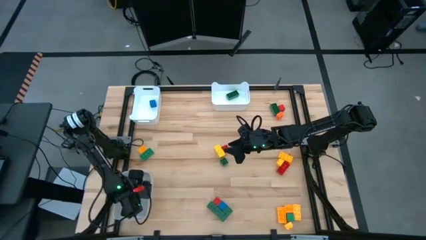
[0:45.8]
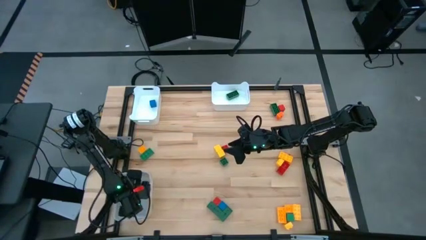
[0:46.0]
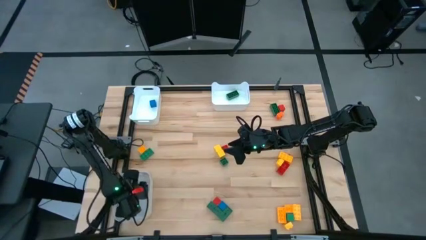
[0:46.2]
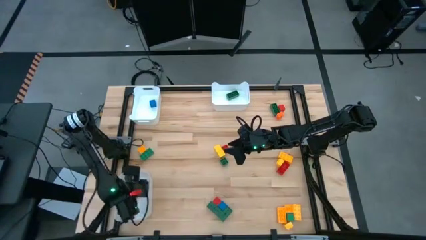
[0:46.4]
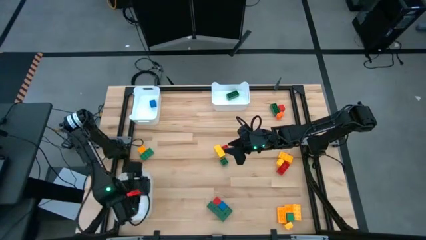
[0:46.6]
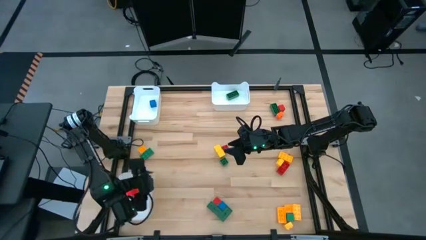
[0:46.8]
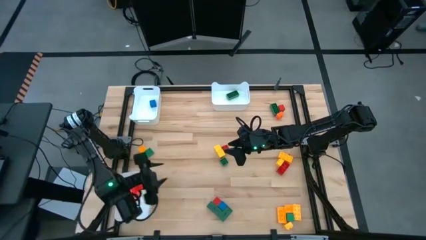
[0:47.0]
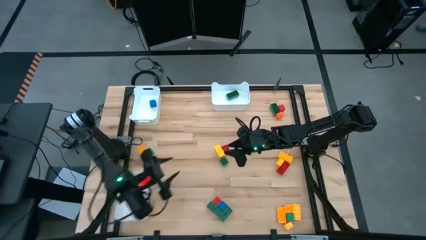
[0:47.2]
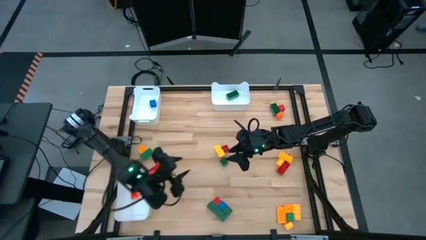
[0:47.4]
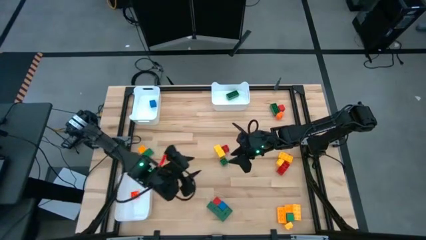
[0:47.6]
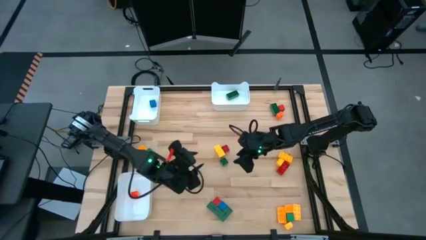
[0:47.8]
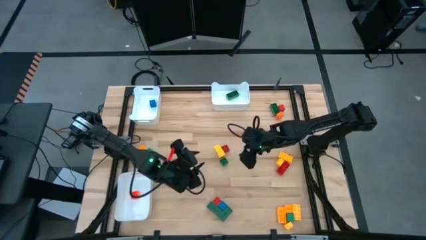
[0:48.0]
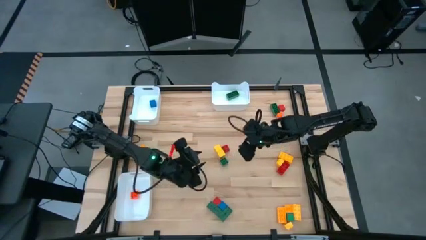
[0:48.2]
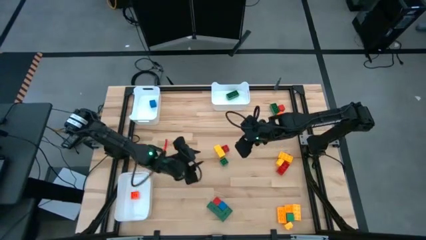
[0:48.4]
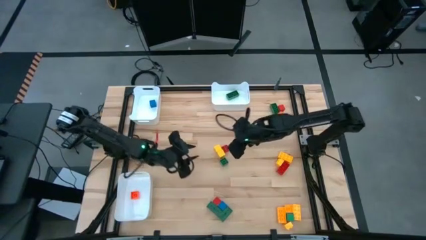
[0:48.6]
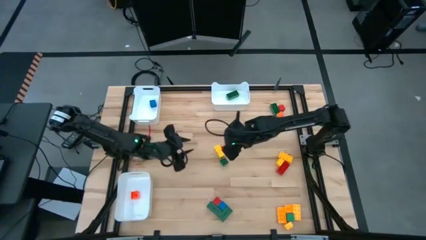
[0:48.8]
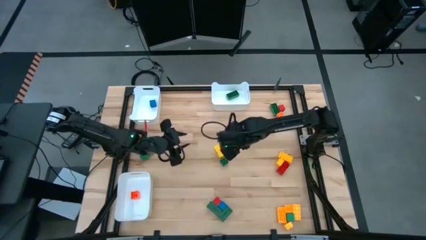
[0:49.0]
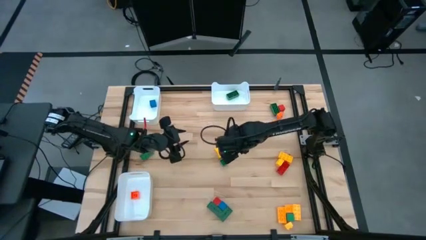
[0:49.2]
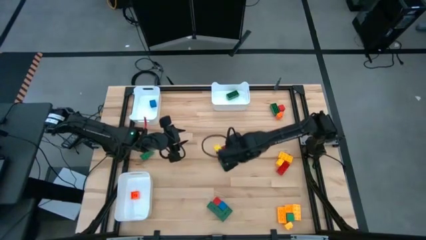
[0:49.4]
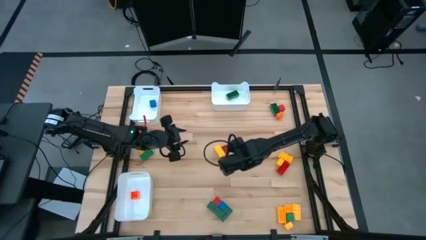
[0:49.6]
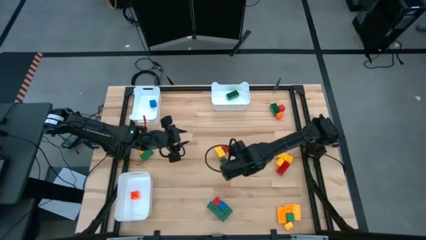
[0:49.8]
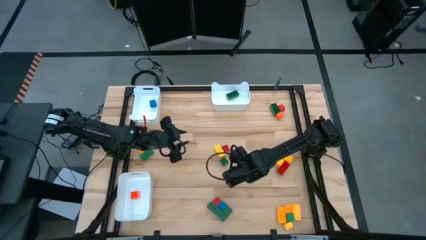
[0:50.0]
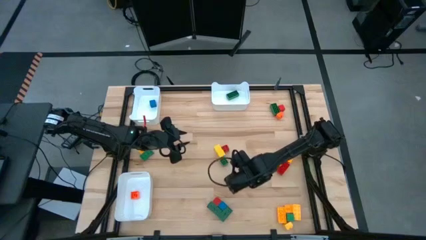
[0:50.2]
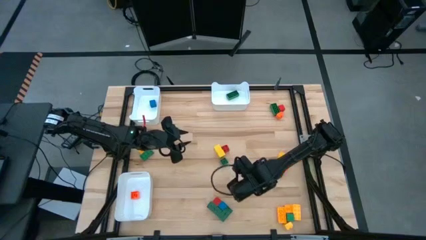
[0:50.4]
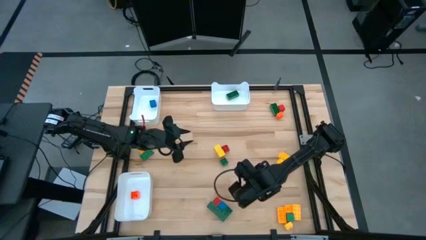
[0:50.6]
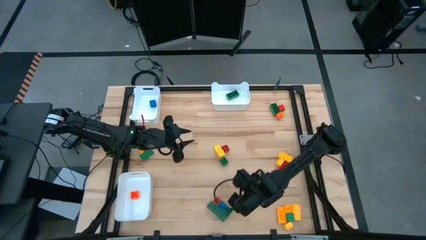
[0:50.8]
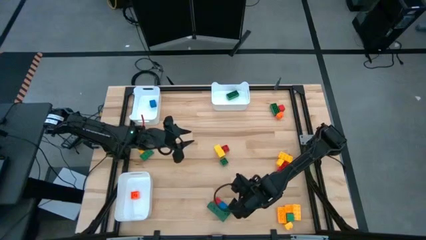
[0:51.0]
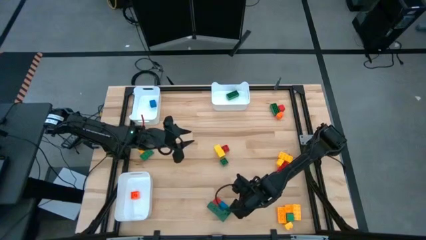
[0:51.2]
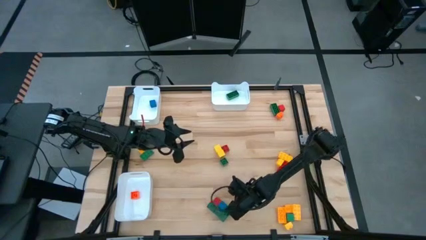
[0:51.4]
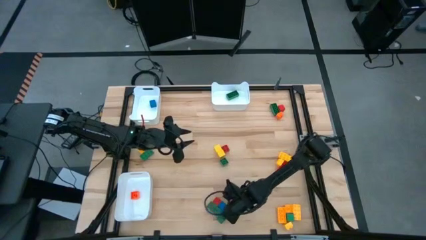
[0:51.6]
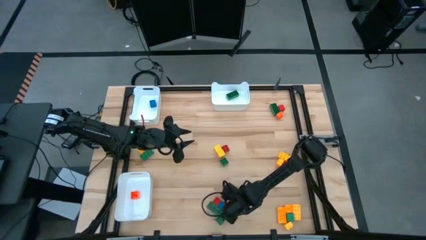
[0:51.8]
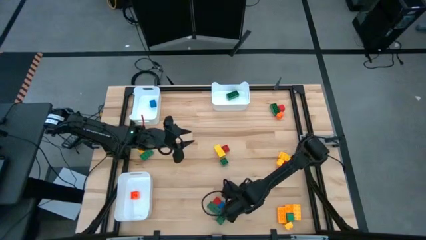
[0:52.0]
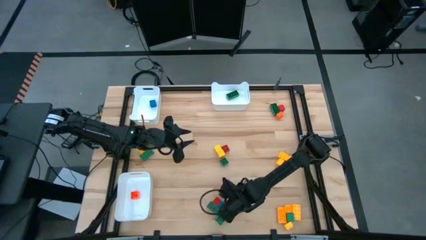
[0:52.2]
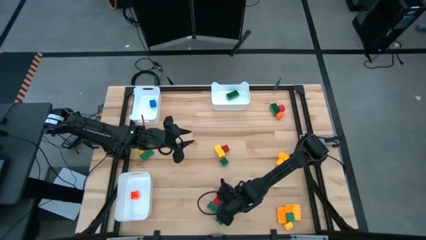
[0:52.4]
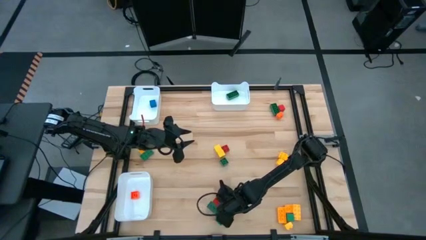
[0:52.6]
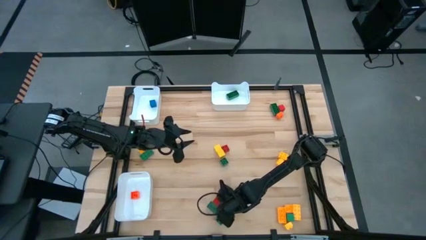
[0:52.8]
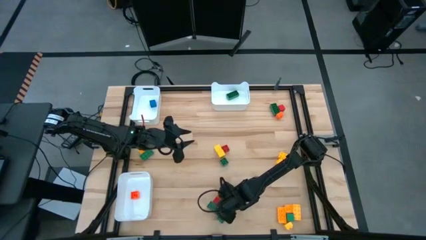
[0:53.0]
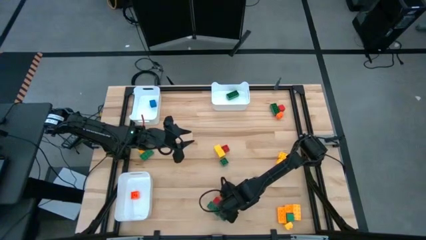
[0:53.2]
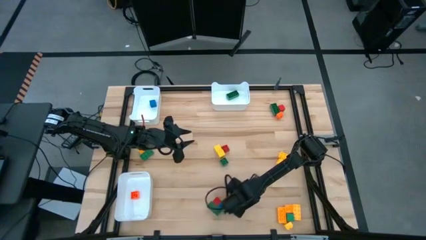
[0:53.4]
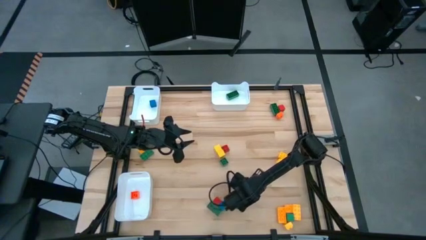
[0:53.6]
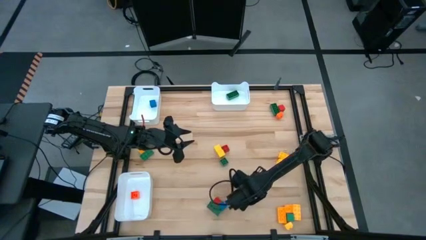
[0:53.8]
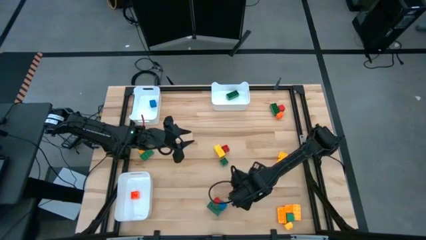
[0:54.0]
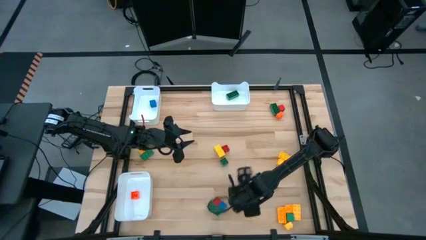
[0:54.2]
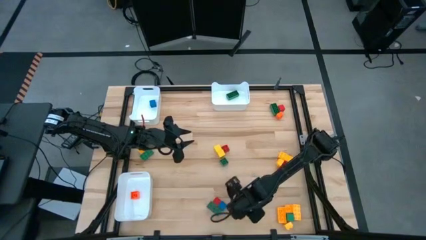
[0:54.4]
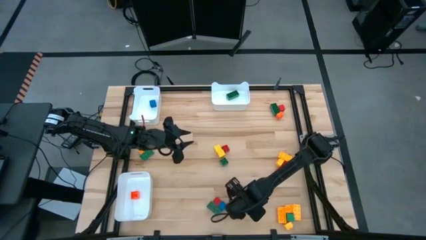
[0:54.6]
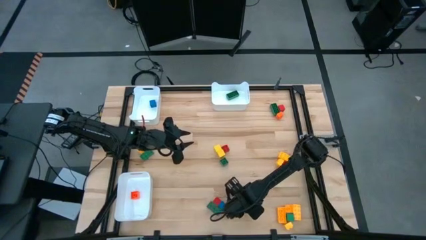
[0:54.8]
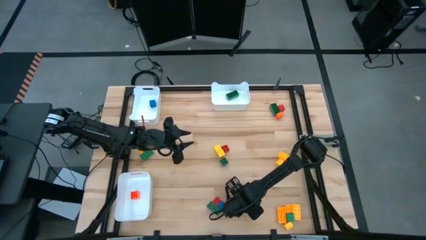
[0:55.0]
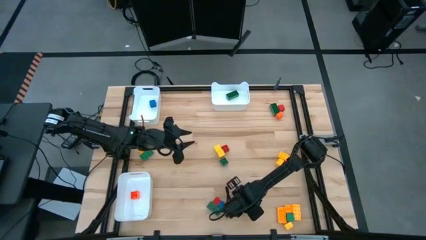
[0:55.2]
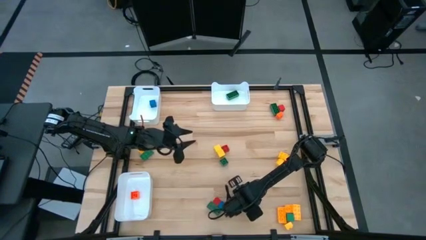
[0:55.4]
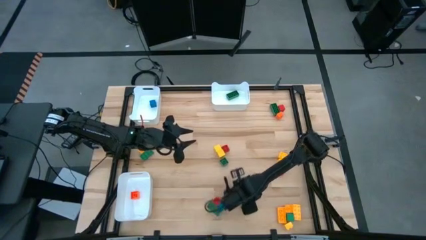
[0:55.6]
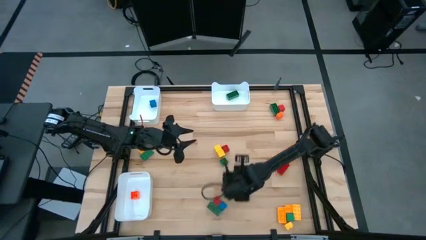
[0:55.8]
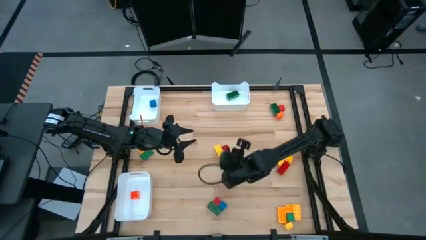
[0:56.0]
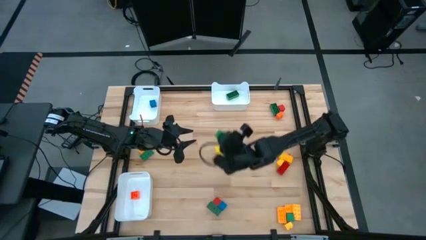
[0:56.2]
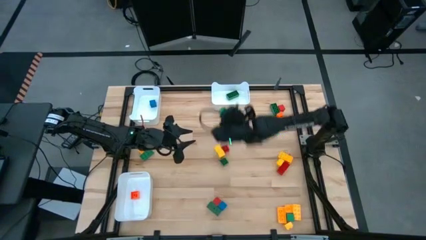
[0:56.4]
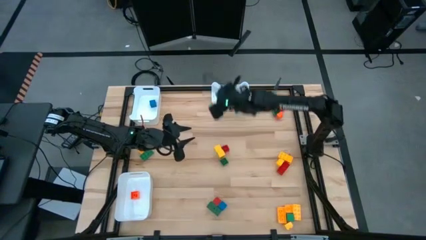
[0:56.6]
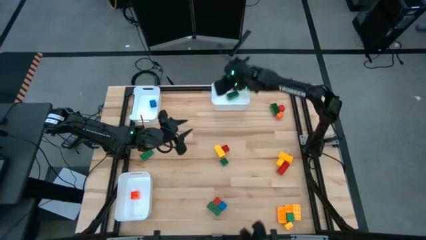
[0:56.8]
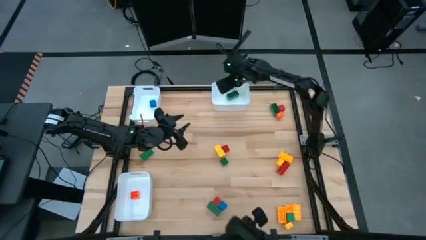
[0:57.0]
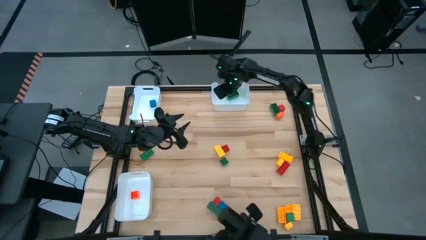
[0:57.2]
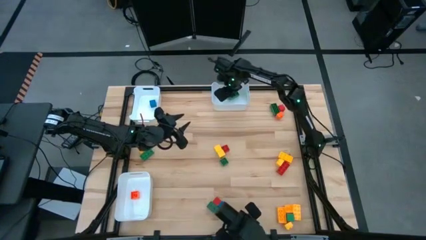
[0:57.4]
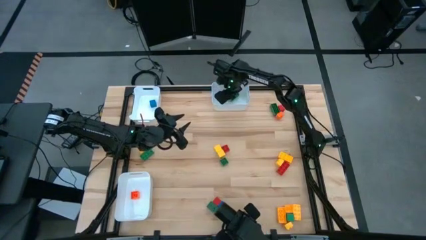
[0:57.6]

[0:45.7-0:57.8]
Task: Sort blocks by size
Put the green 8 stud game piece into the top right white bin

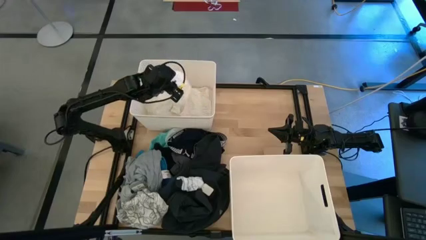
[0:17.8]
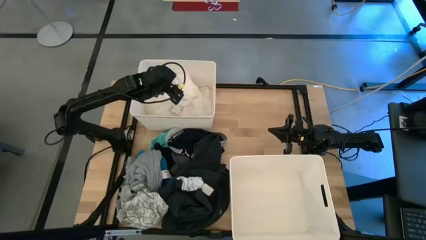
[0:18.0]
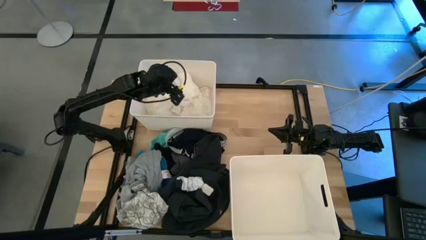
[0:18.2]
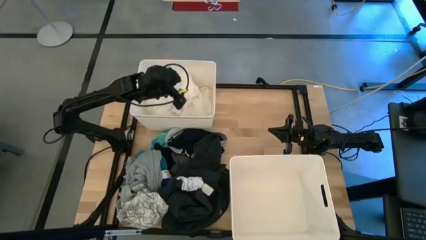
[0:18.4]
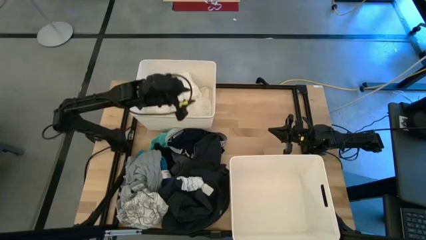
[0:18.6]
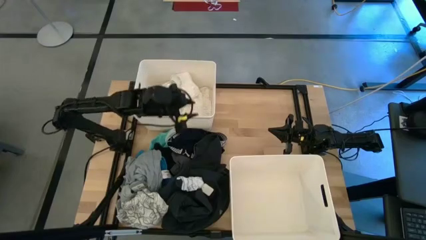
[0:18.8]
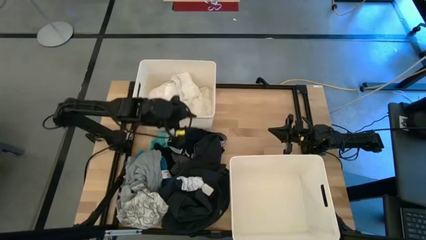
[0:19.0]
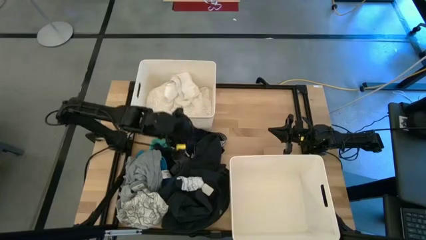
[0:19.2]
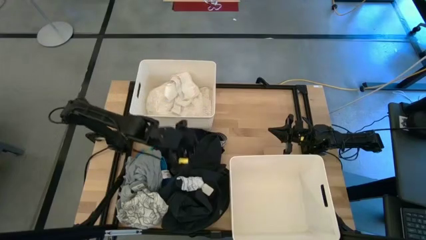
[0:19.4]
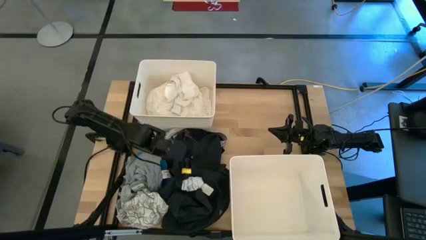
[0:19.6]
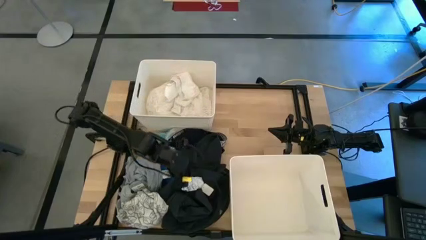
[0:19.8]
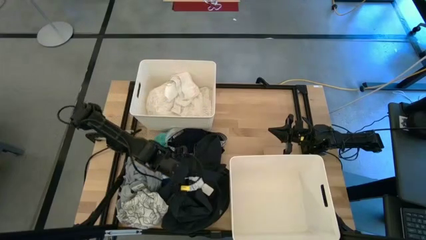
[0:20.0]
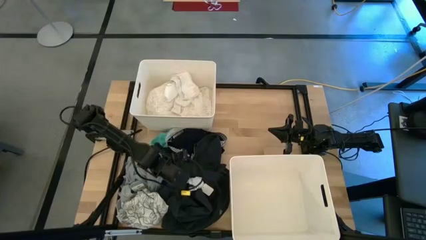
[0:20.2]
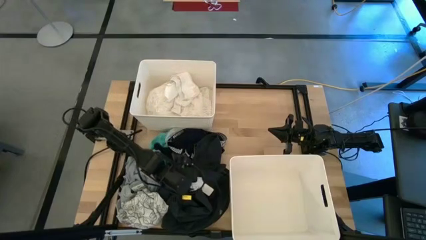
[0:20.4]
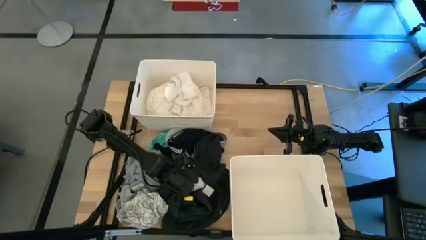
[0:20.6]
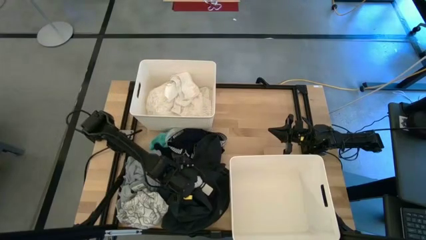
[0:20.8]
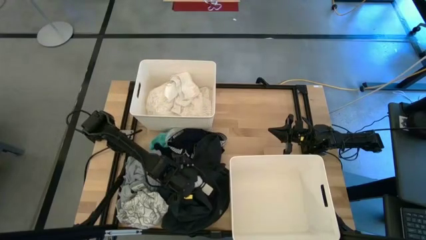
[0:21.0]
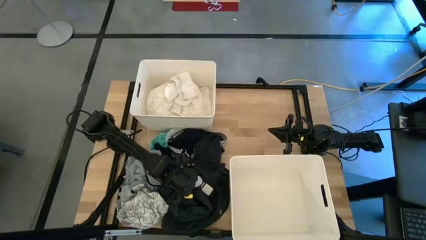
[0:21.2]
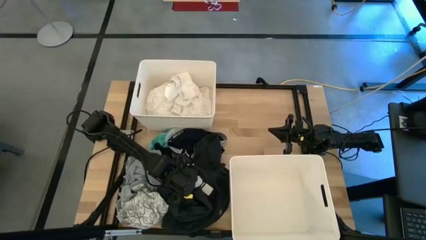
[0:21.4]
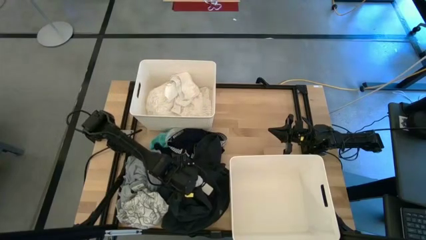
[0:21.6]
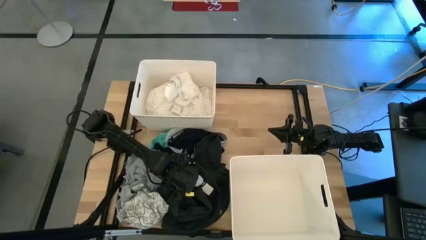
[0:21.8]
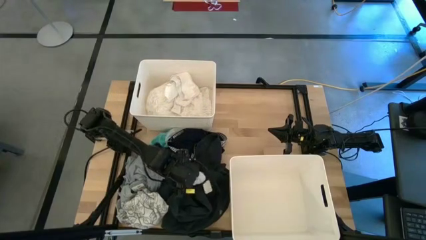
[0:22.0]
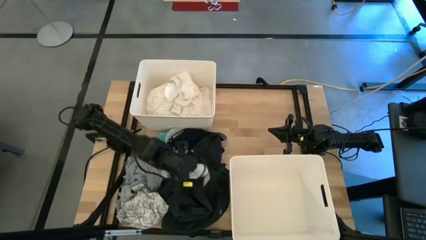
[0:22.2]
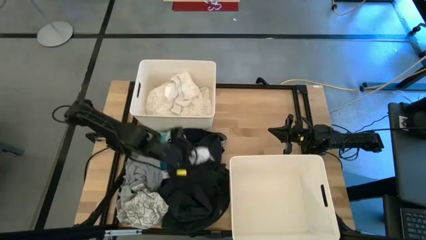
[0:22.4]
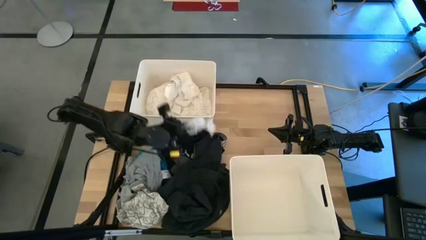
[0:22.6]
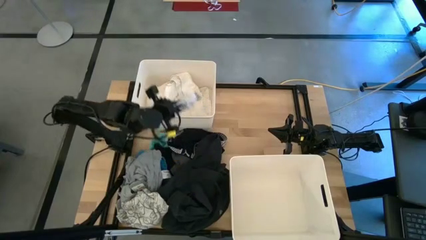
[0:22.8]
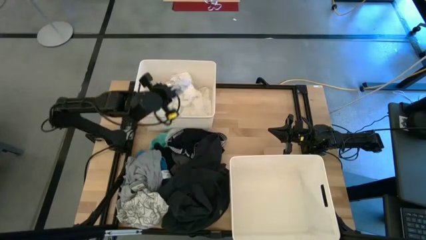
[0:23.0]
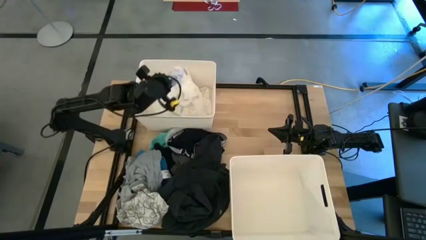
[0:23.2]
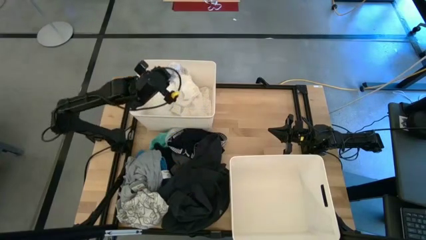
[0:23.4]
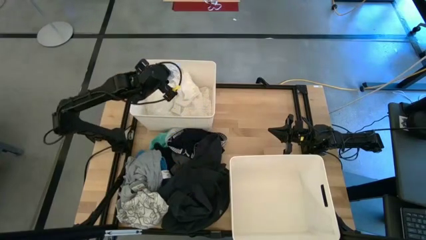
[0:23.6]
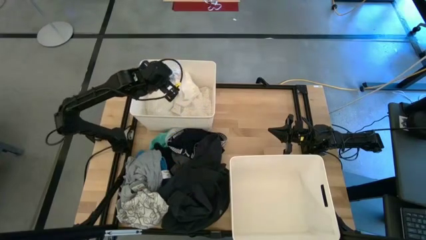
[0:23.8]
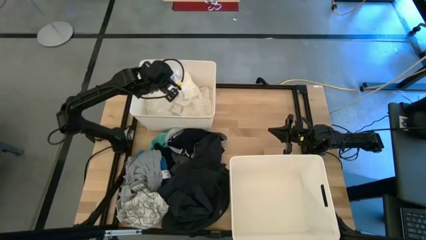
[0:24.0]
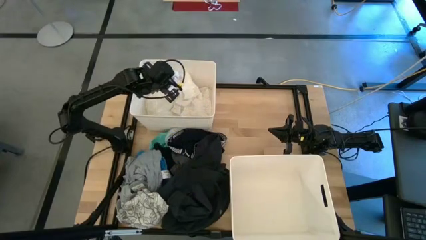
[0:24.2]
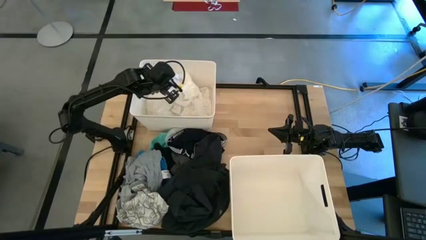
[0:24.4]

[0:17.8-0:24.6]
Task: Sort clothes
Put the striped sock into the top left laundry bin
